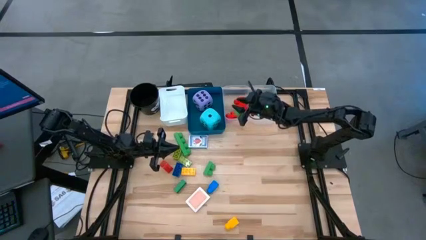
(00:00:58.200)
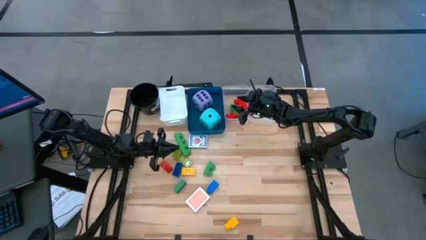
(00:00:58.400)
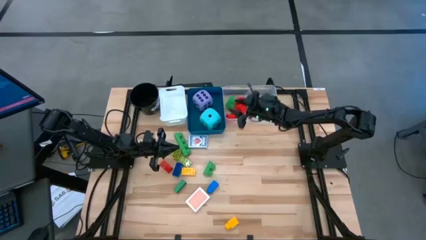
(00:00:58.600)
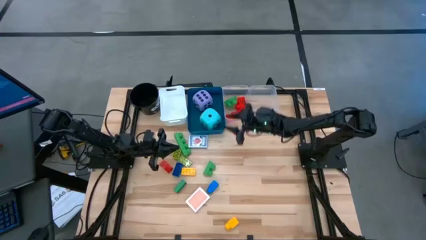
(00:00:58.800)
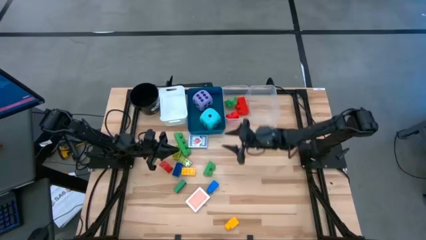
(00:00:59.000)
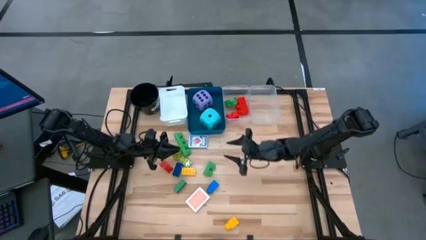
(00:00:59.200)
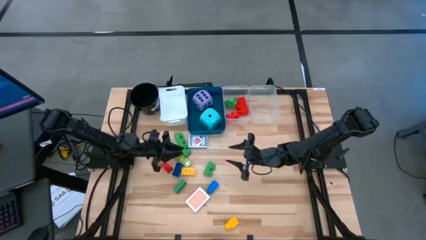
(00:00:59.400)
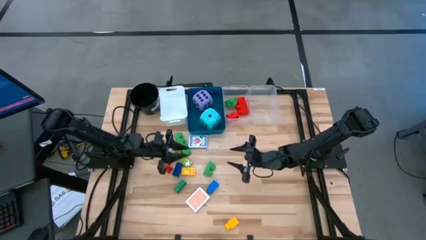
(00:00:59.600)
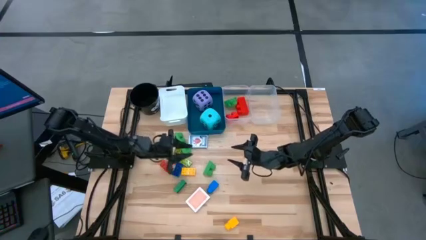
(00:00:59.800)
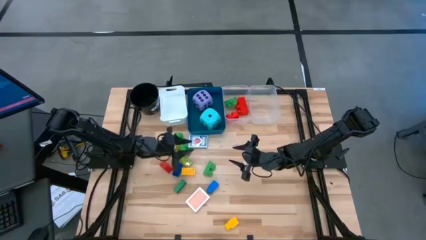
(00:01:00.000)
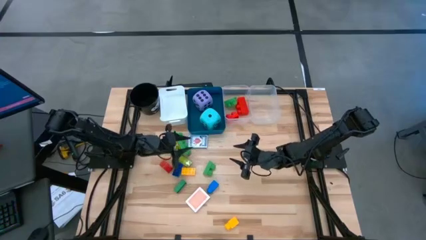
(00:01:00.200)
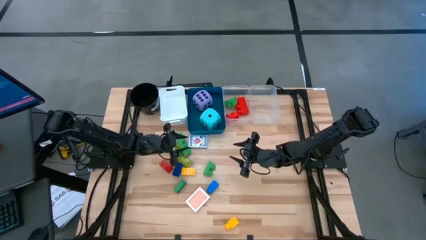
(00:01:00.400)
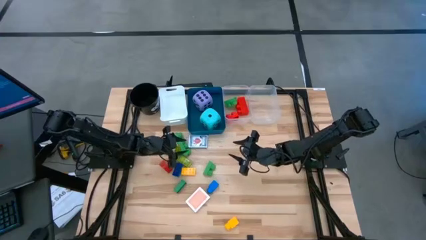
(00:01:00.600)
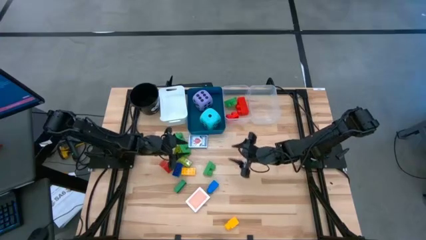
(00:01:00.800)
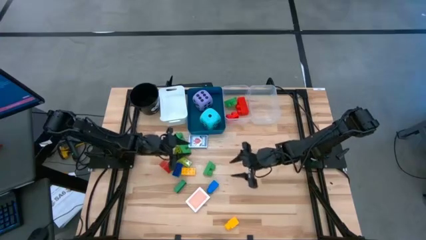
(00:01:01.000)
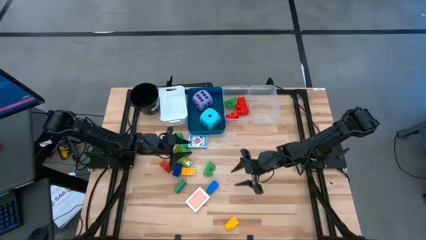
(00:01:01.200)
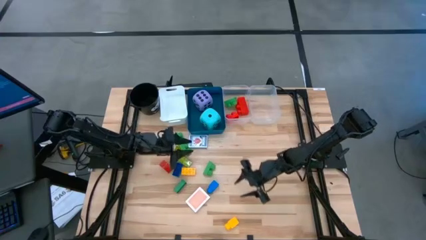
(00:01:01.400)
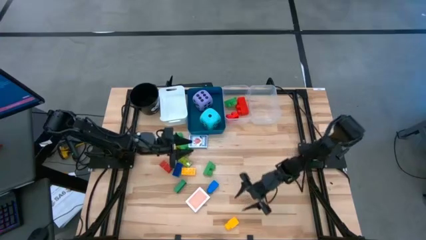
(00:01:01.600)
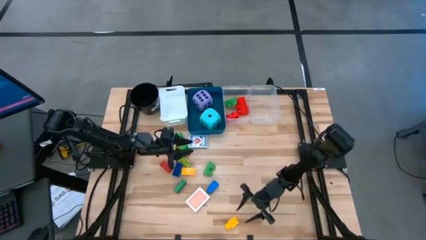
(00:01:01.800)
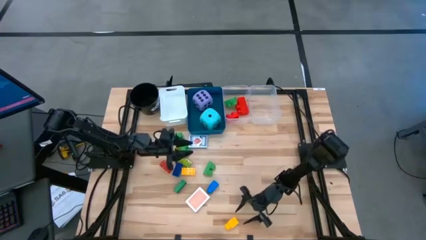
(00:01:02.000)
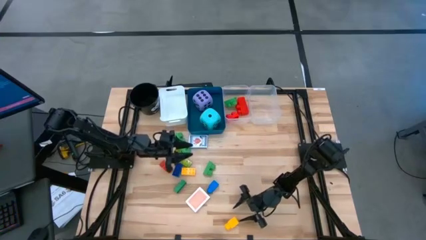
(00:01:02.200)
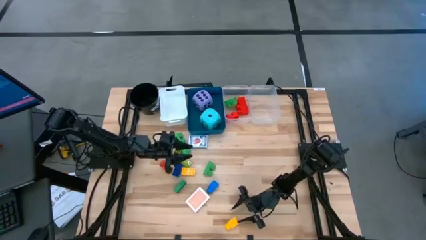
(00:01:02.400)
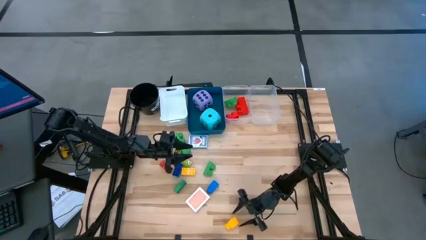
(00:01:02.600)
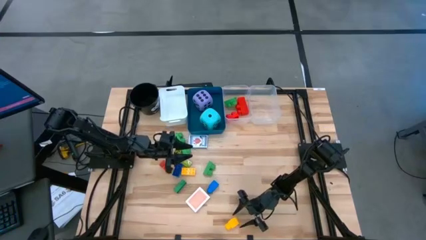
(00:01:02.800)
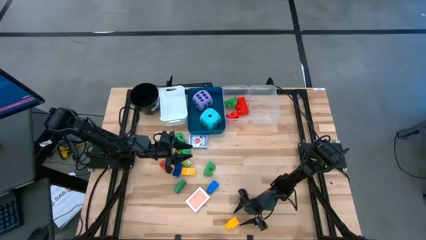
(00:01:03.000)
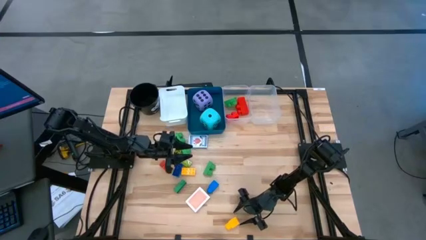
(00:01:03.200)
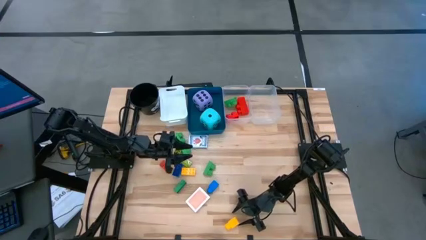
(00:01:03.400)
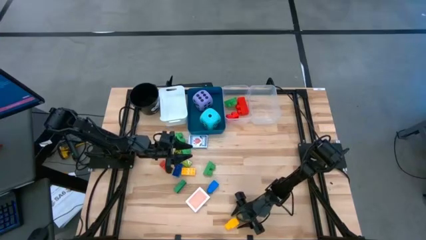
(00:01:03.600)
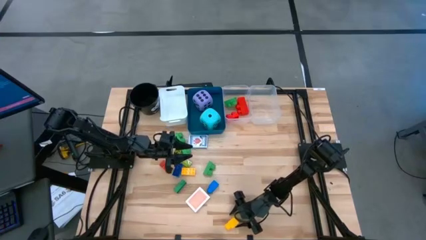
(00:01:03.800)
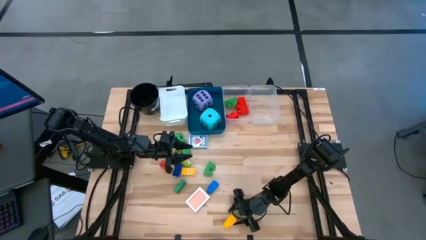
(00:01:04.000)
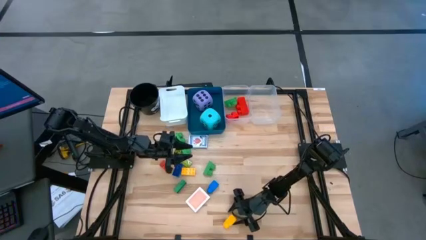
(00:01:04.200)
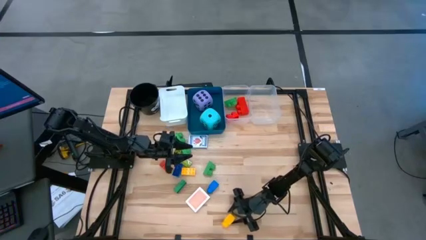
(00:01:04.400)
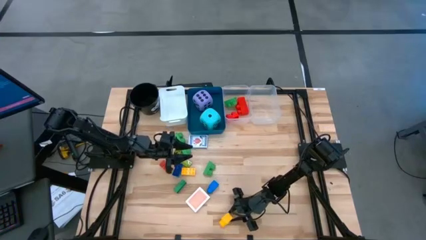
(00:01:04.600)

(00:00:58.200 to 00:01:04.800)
Task: Pick & Place Toys
Put the yellow 1 stud game piece into the left transparent bin

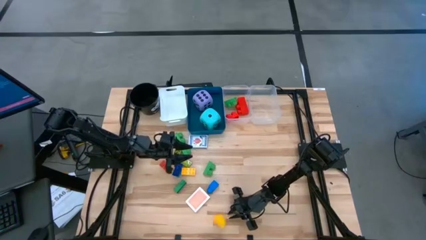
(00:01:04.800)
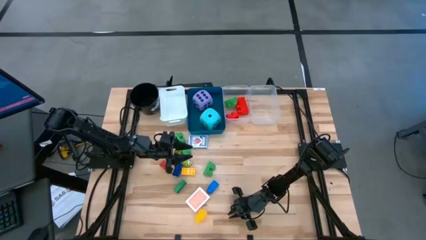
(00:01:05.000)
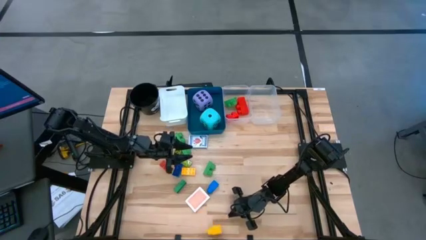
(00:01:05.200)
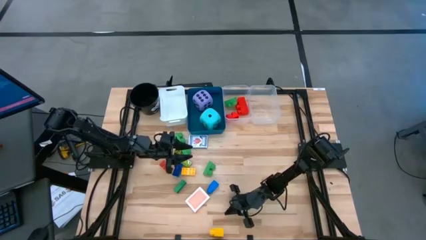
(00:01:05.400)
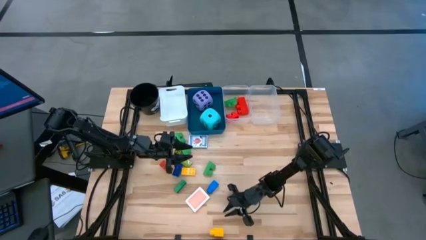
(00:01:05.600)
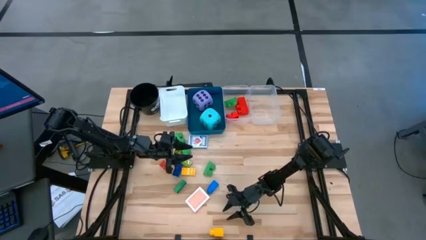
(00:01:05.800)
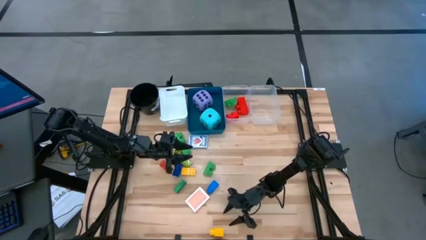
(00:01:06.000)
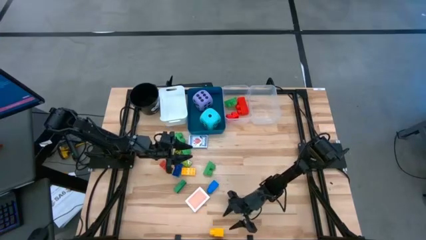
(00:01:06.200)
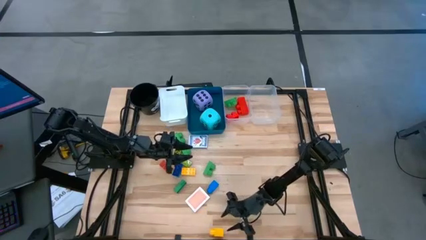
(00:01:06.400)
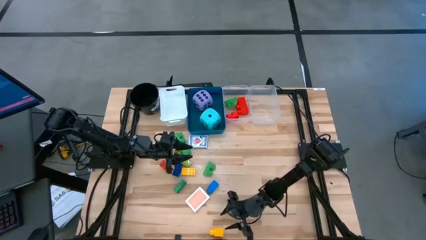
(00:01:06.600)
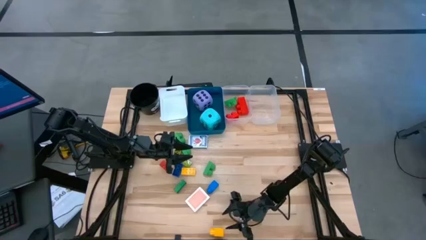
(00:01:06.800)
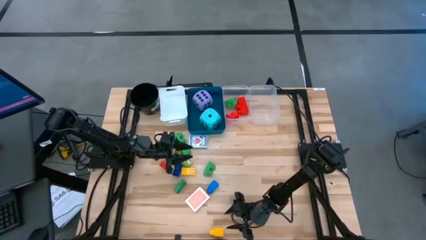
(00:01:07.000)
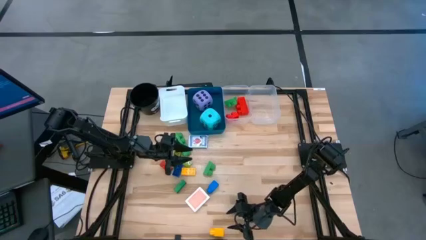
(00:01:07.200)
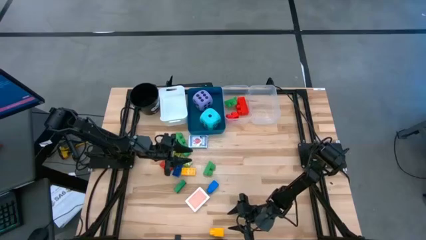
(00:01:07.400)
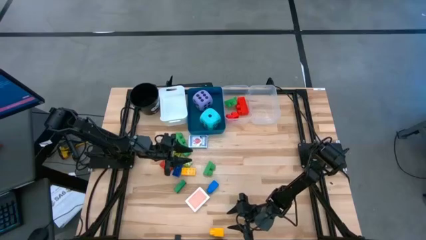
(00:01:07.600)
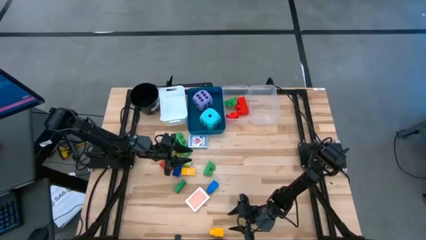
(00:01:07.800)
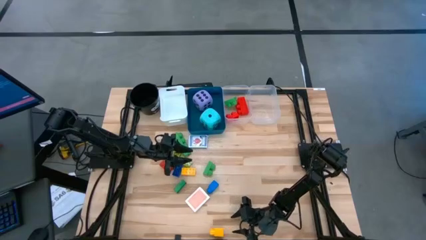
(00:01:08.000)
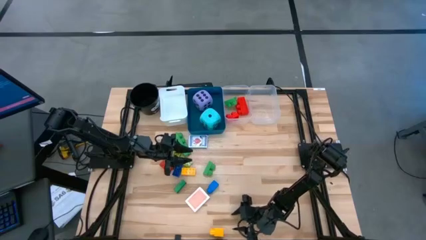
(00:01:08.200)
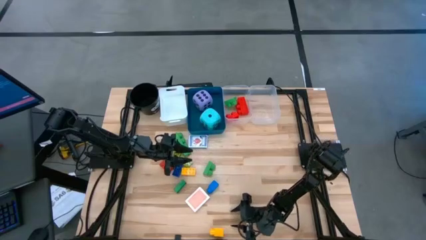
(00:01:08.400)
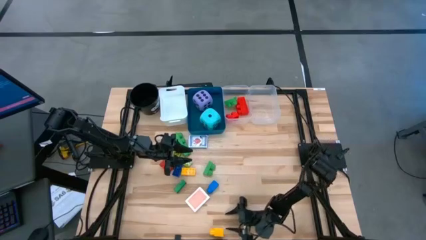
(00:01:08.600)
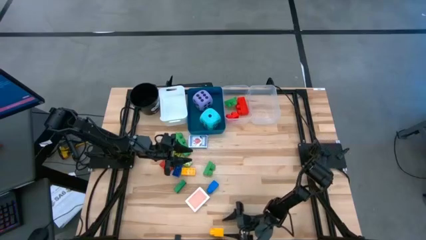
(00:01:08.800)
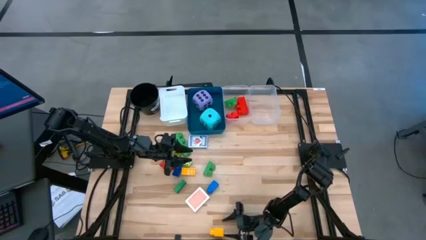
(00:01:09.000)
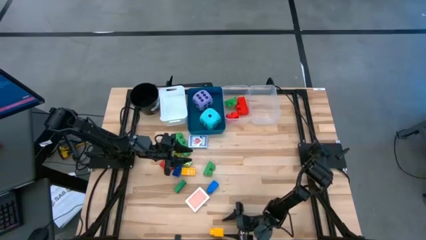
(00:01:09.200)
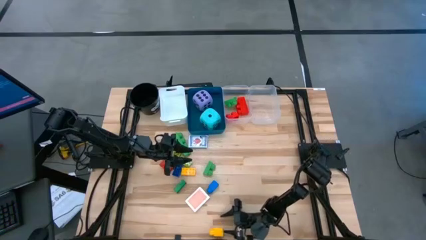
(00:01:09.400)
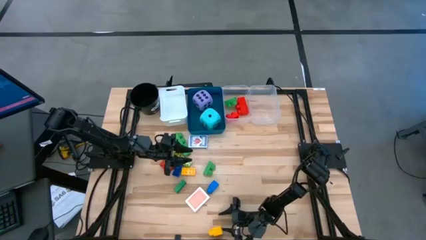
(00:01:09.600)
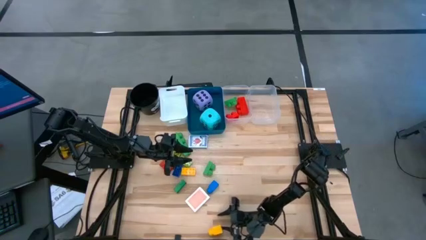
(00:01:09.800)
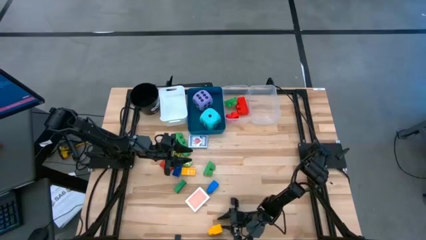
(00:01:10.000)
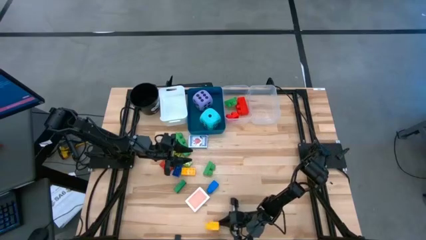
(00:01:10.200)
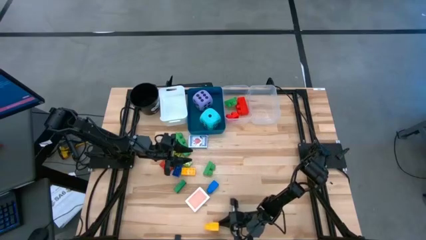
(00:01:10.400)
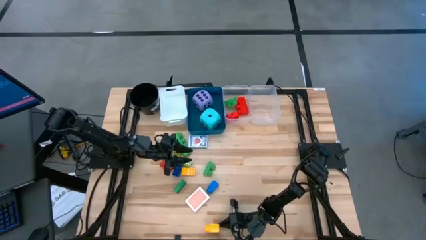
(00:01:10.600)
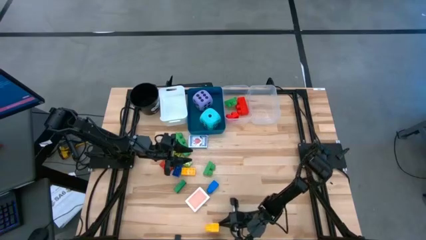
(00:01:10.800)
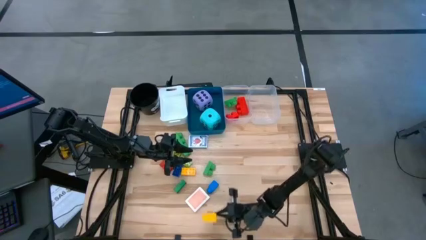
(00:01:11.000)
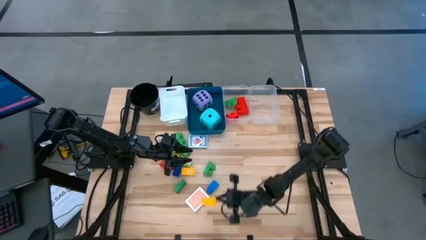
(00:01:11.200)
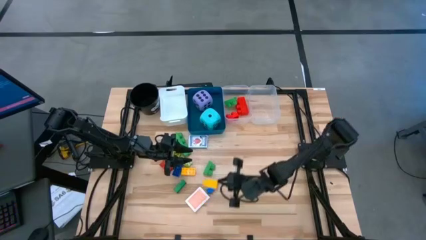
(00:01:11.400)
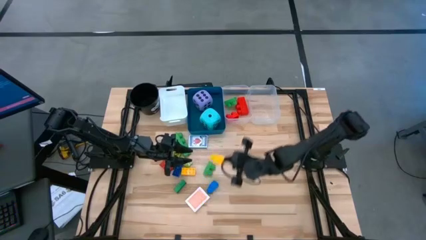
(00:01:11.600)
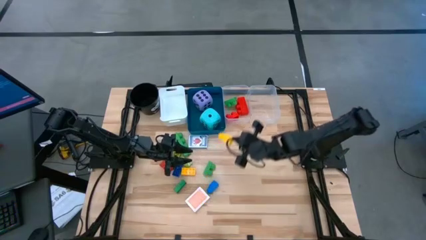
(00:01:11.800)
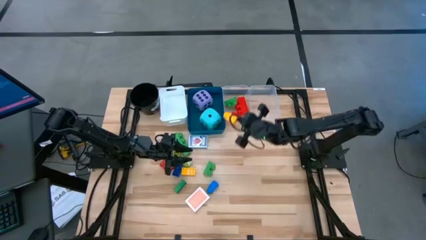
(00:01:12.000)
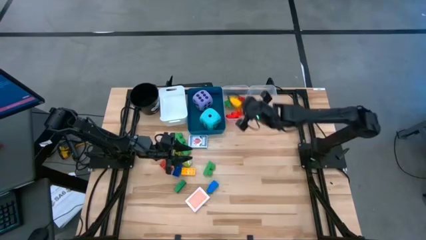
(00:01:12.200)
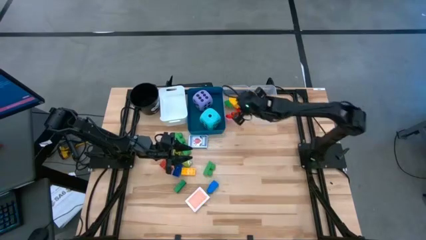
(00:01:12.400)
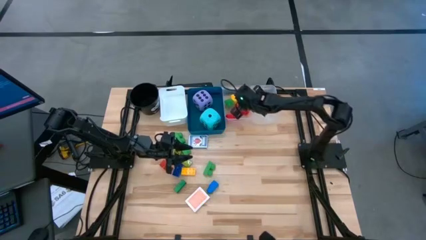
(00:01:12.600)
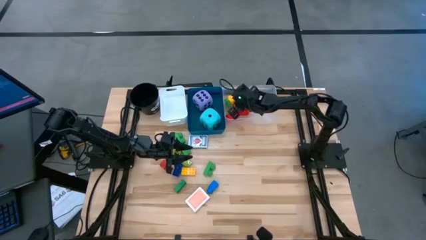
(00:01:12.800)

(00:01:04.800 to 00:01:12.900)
Put the yellow 1 stud game piece into the left transparent bin
